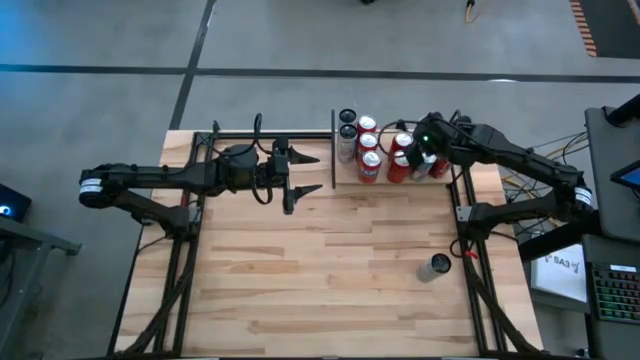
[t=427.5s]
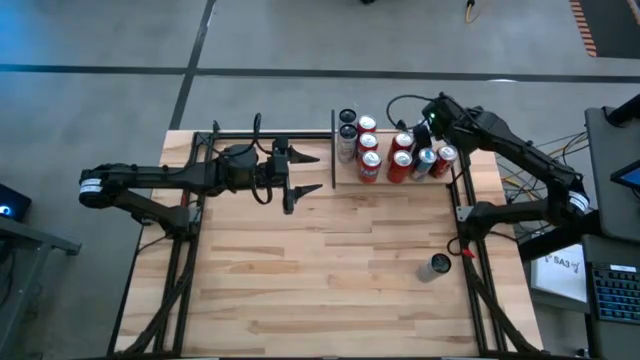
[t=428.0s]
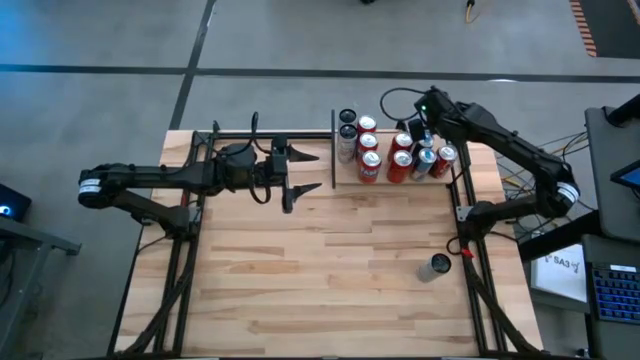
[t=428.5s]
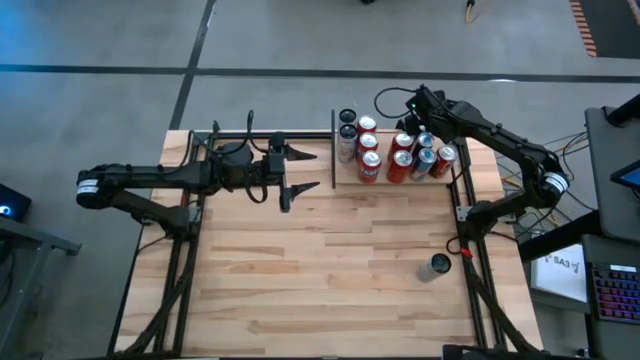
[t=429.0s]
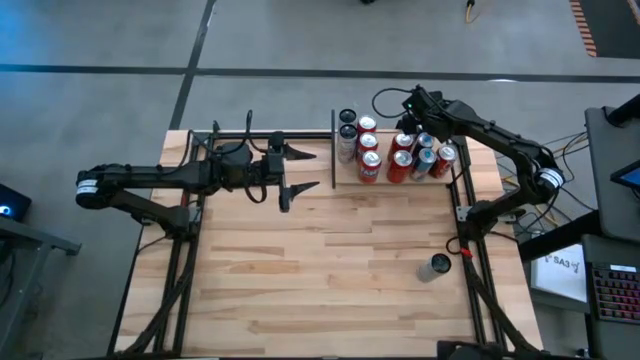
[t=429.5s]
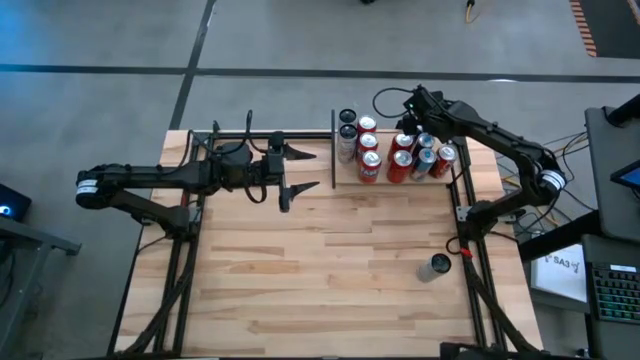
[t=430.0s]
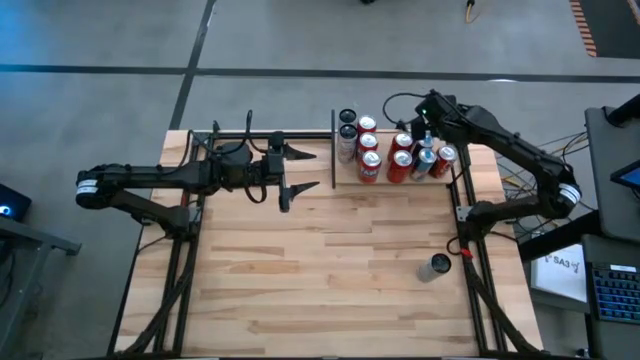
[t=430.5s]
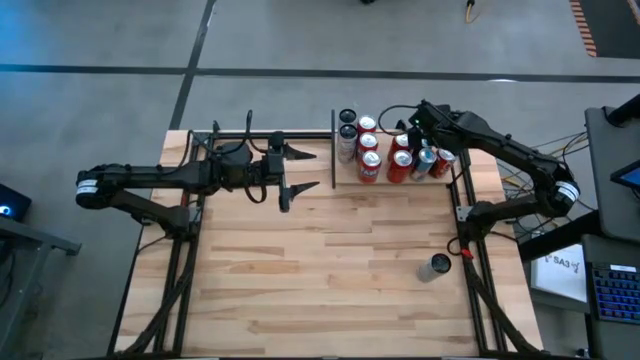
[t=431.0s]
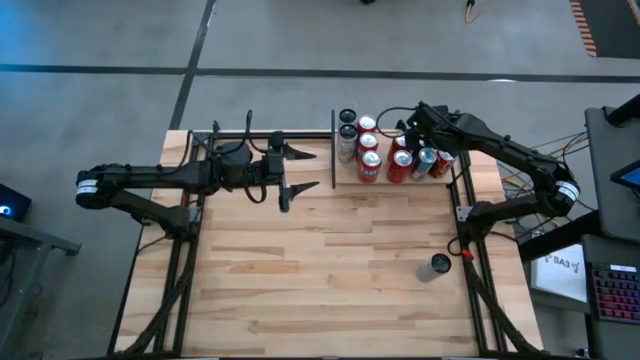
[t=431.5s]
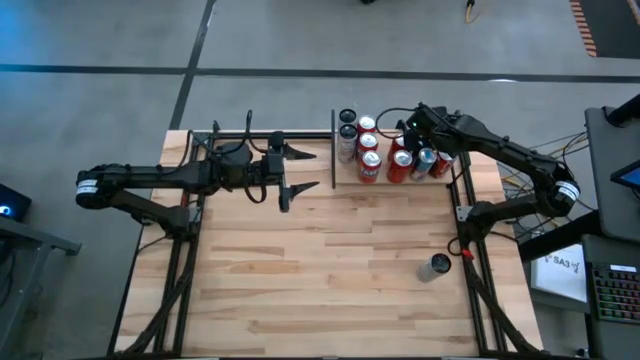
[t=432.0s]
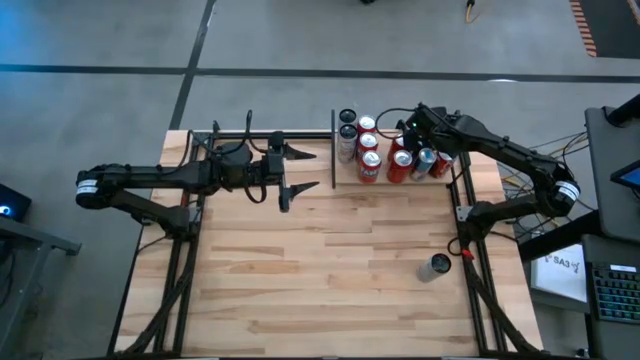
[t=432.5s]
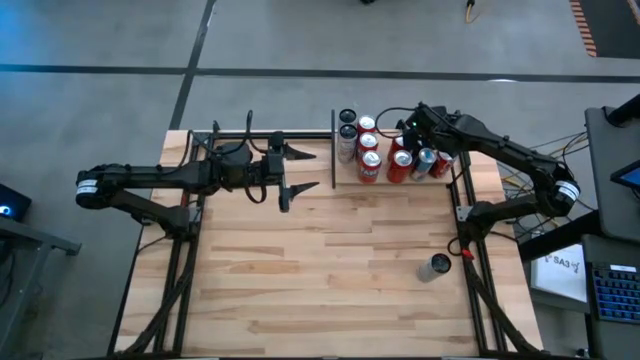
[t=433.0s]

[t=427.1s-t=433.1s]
Task: Place canned beverage on shelf
Adjust the white and blue soda cans on the shelf

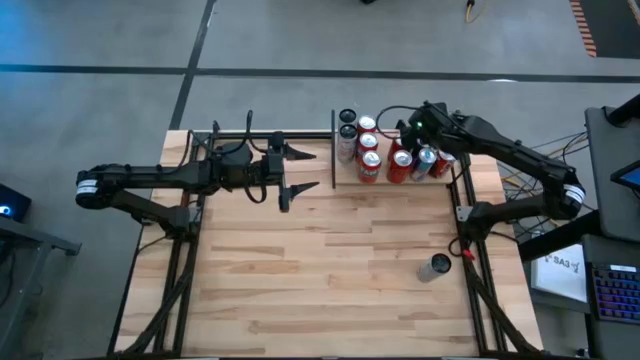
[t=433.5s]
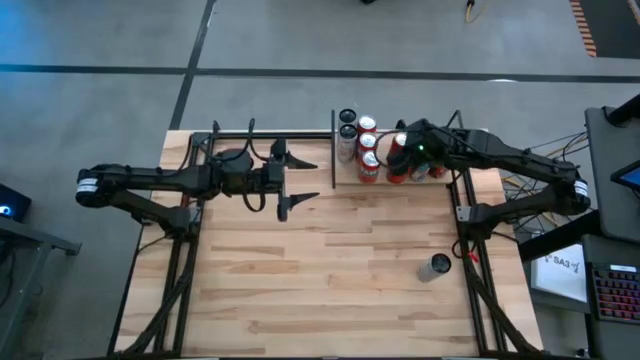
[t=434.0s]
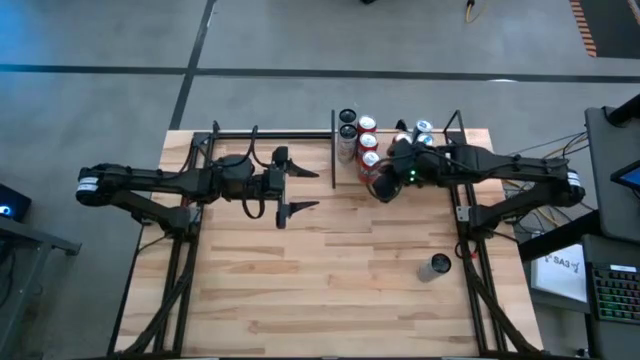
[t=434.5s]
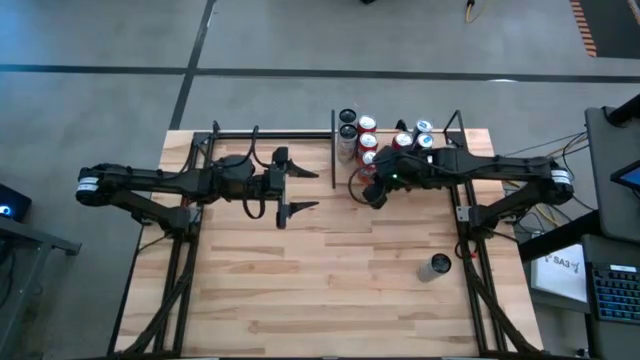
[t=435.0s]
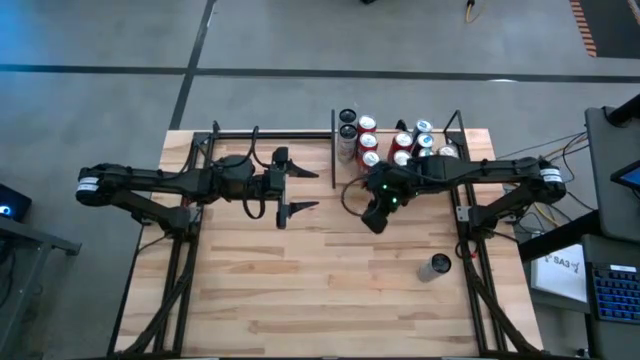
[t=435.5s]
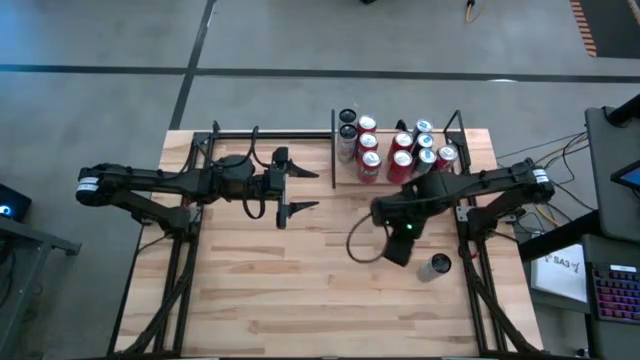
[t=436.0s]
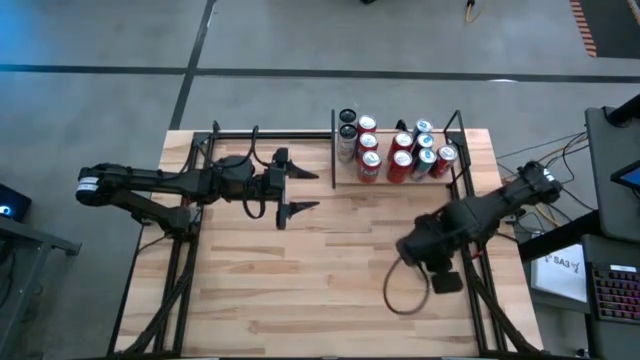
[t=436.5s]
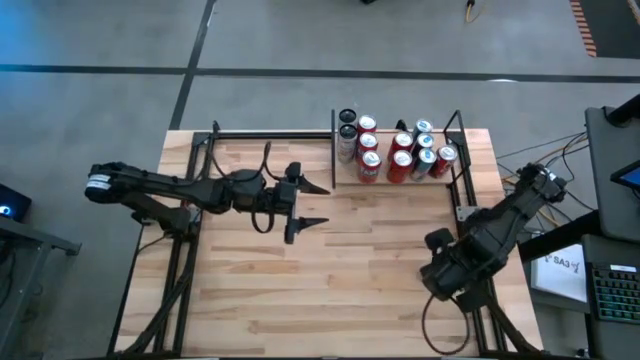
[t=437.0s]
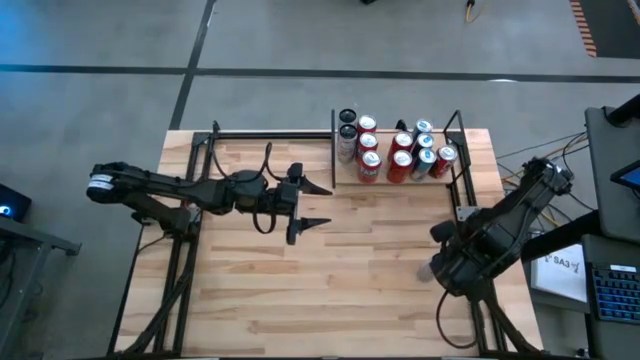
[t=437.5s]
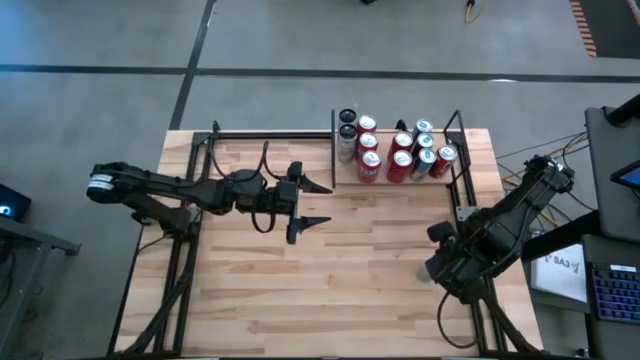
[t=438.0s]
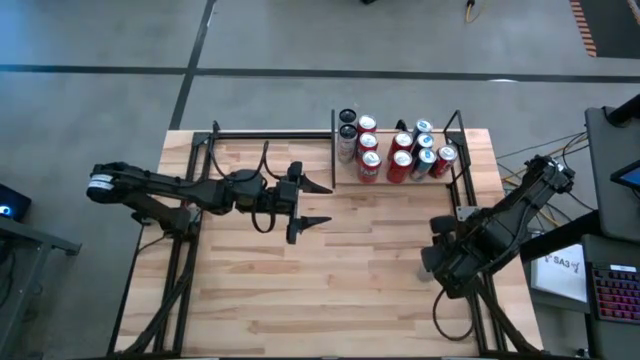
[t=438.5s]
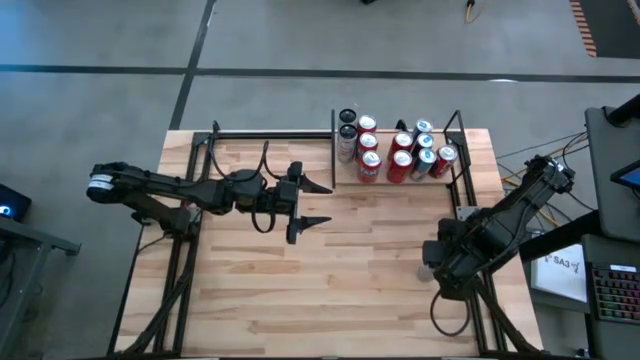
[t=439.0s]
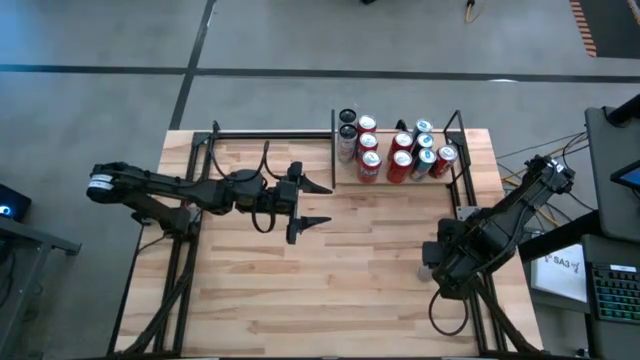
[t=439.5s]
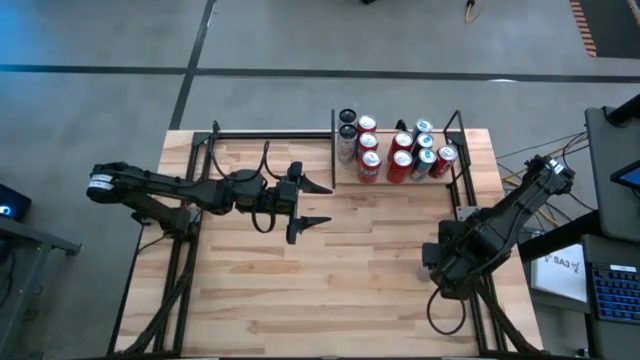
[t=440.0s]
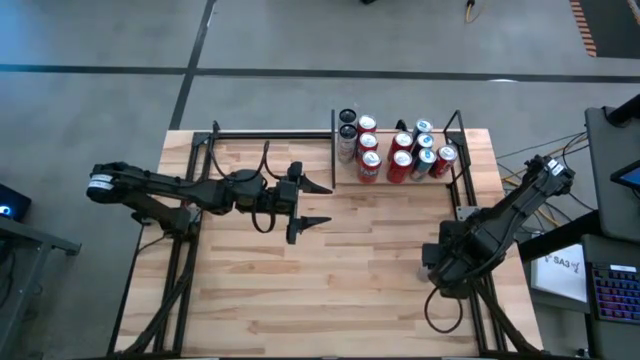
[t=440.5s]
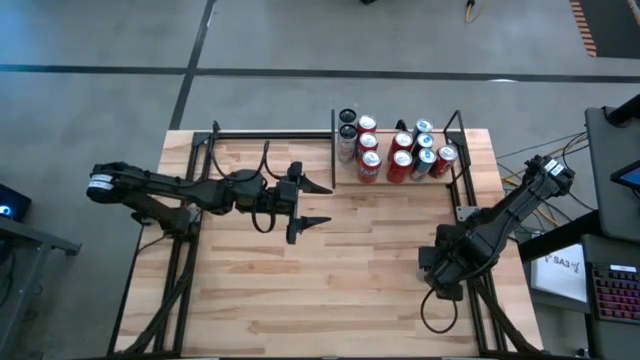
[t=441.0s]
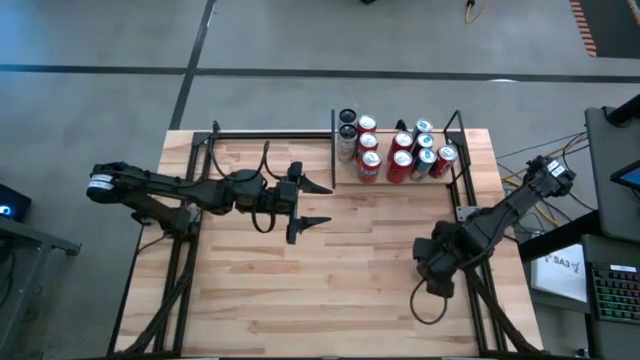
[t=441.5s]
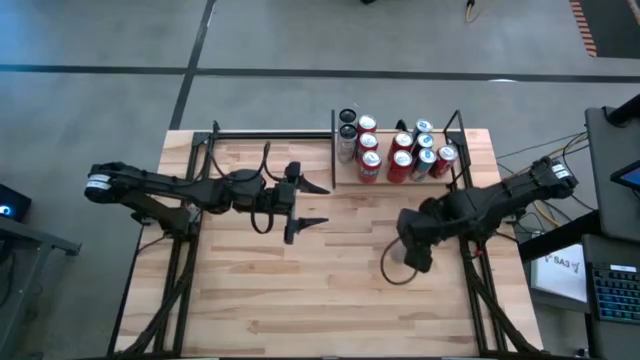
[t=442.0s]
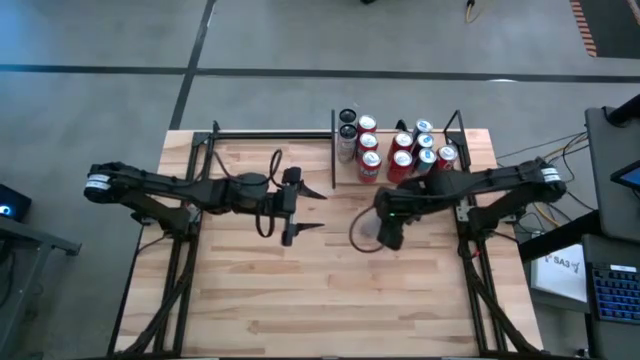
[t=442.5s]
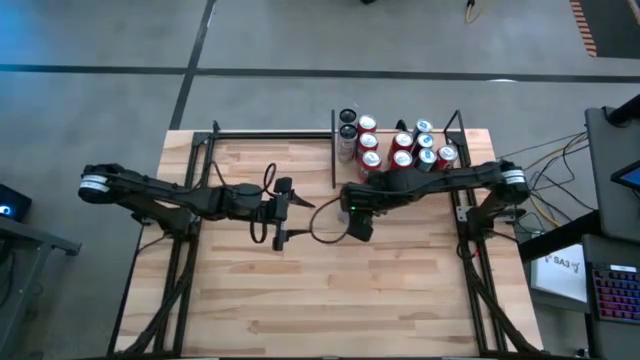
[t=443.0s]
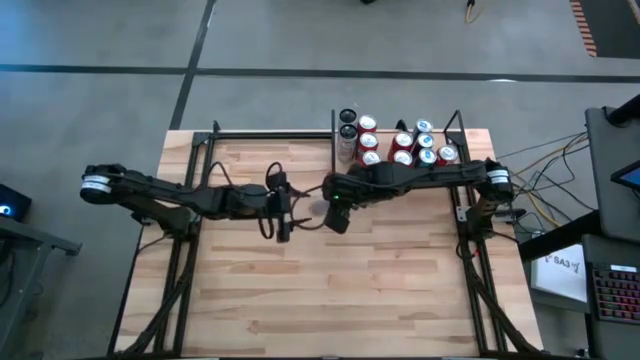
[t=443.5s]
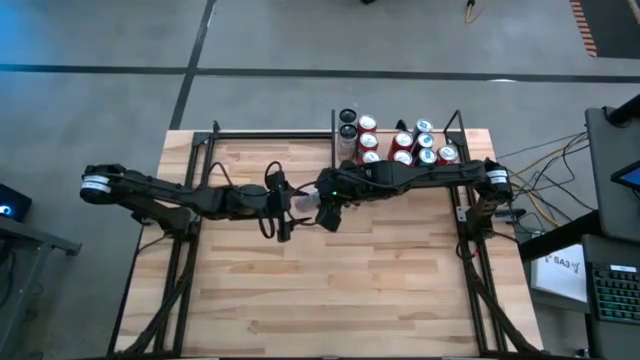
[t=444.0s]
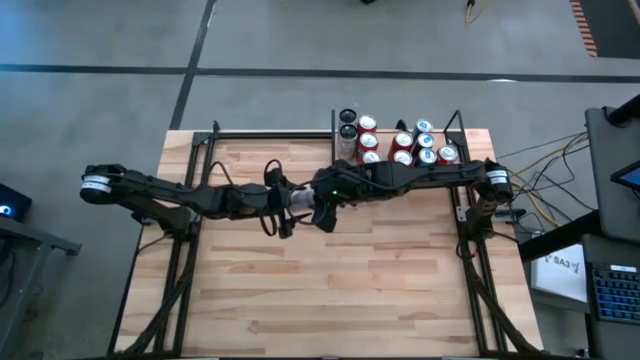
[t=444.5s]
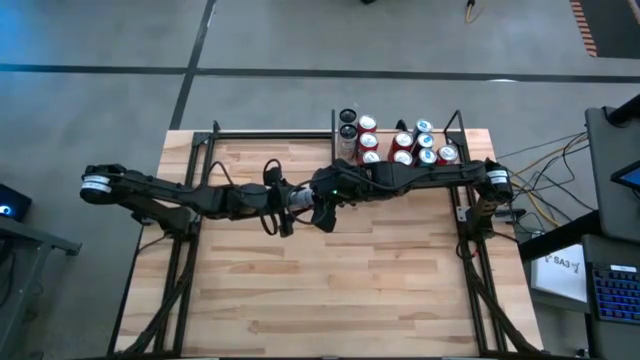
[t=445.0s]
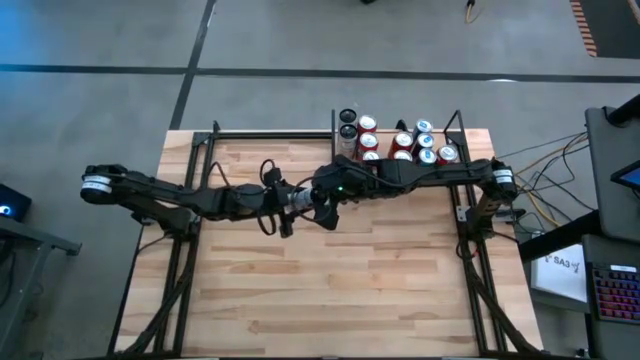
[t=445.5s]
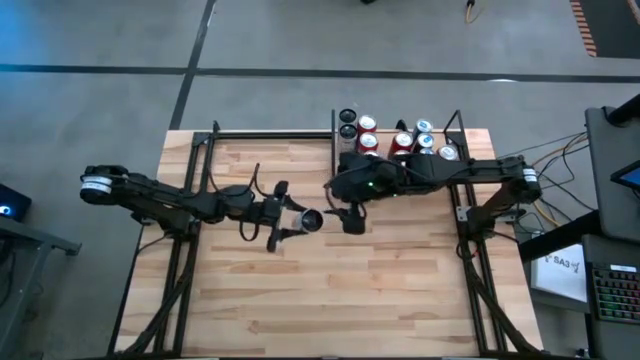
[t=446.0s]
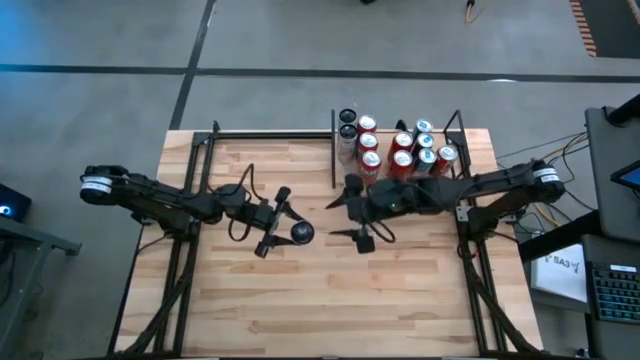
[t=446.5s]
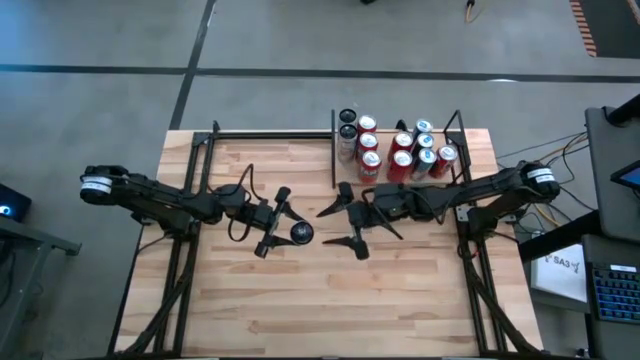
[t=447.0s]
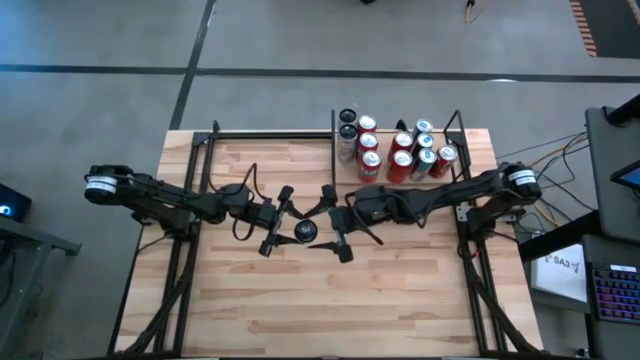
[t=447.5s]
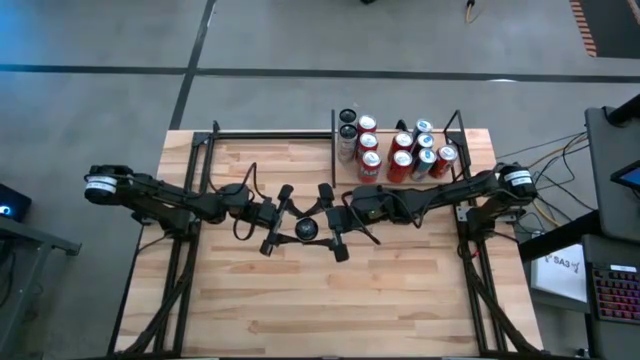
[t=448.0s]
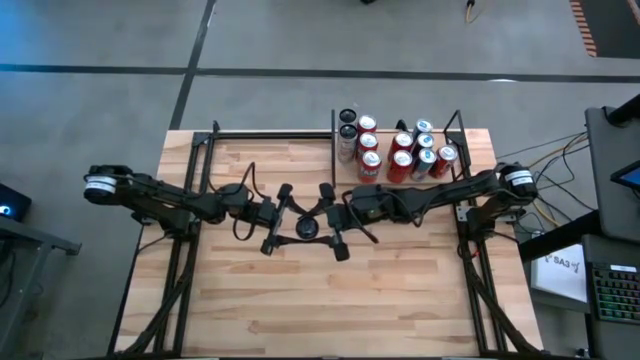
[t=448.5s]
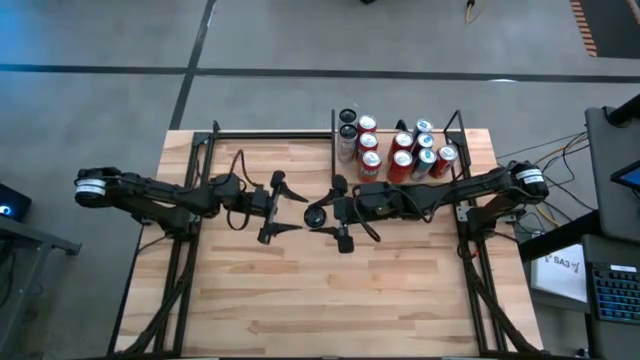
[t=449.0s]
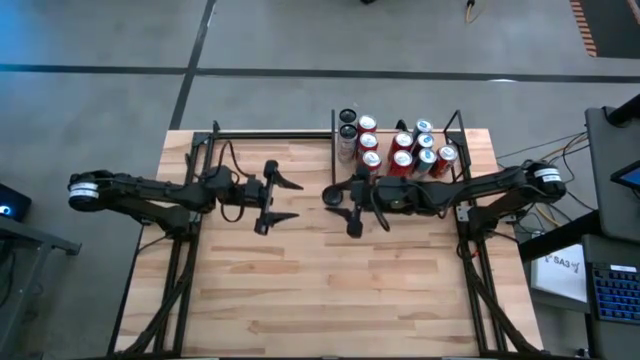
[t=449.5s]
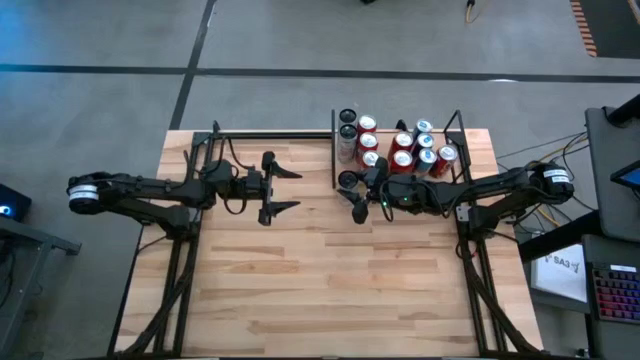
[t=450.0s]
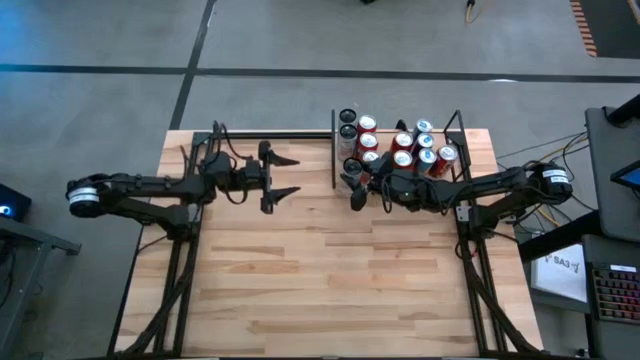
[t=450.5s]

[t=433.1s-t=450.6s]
Put the white soda can on the shelf aligned with the other white soda cans
